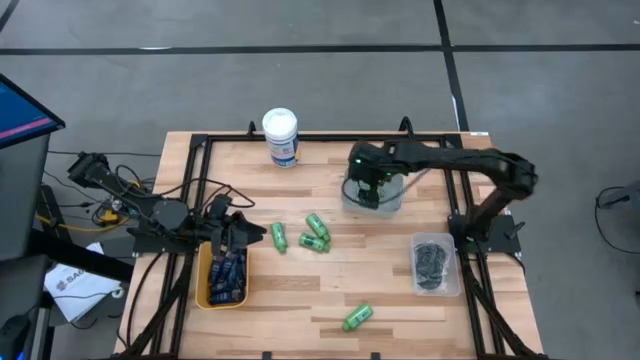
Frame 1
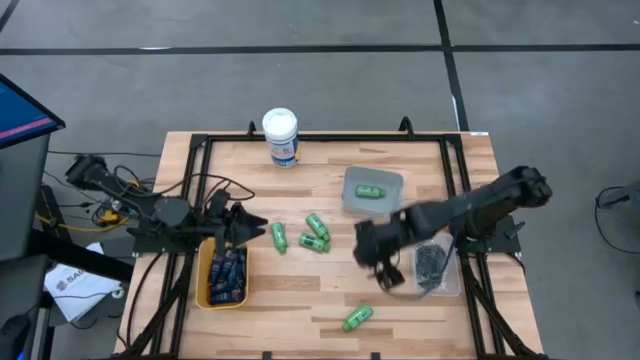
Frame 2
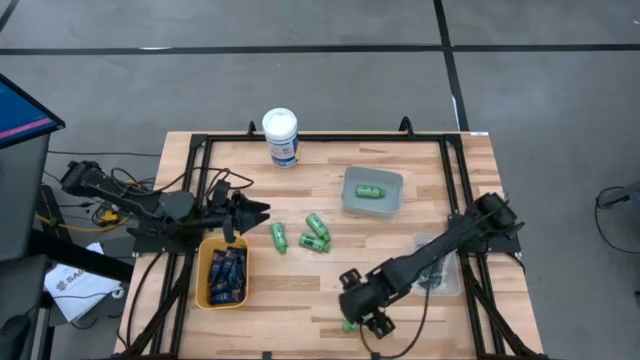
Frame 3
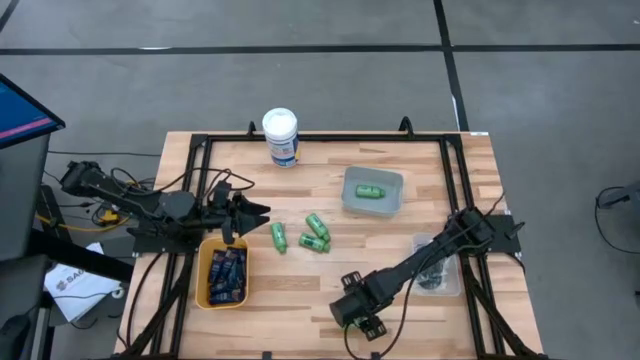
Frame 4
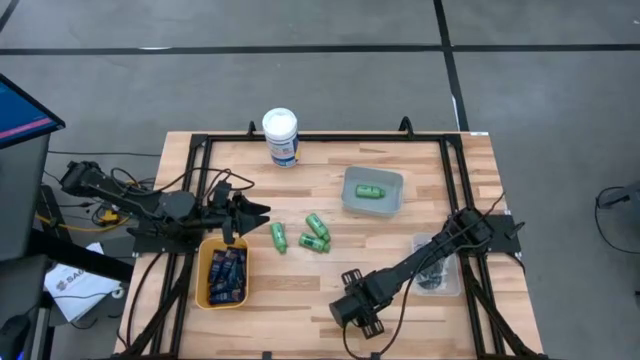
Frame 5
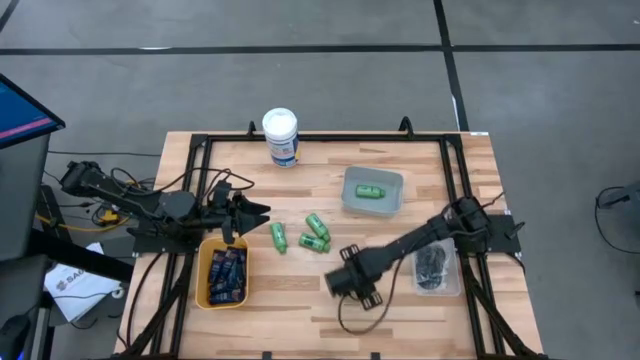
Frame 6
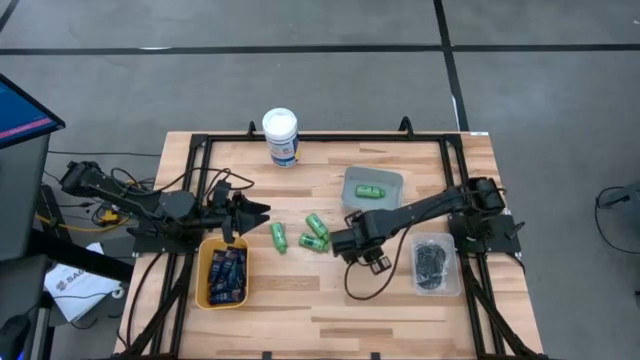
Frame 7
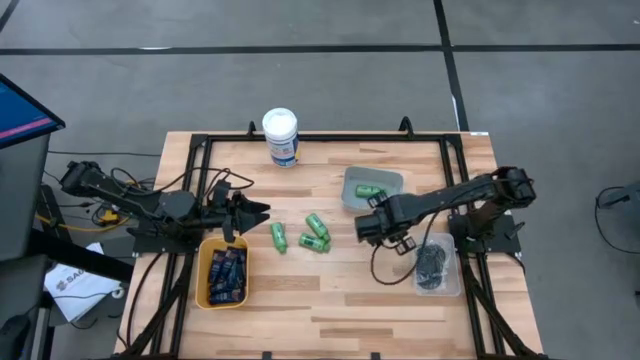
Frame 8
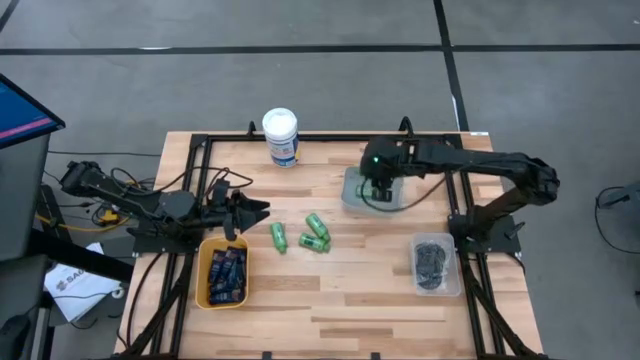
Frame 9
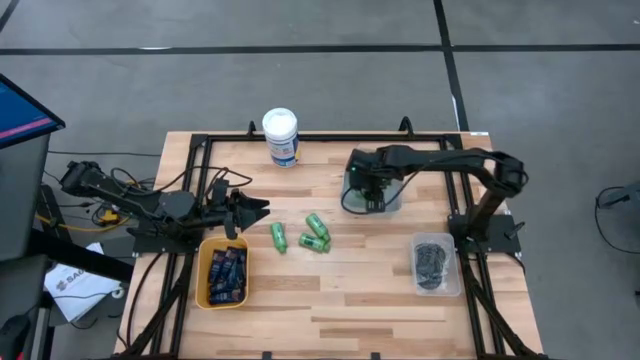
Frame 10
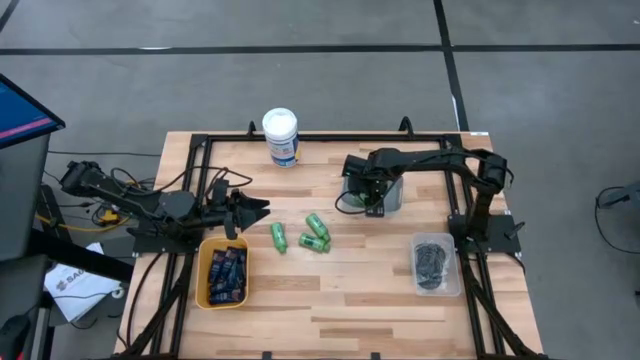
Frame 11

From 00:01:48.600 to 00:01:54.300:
Task: Pick & Place Travel size toiletries
Put the green shampoo into the gray bin

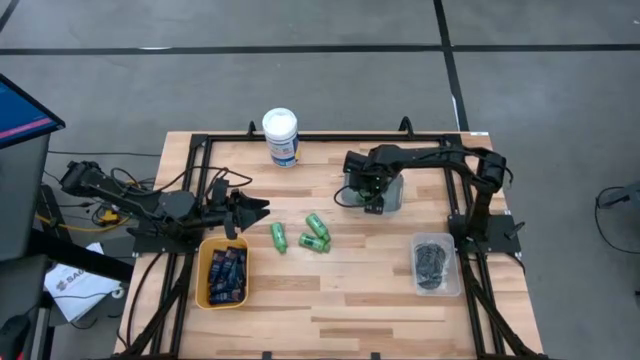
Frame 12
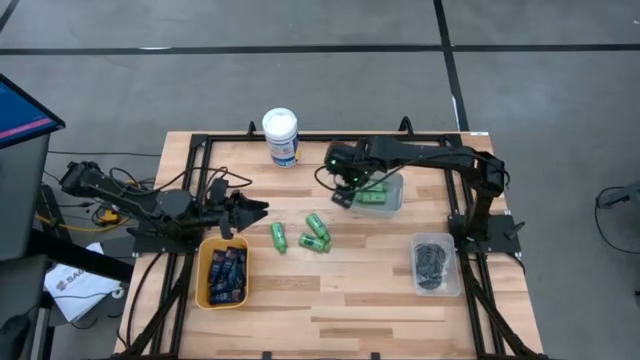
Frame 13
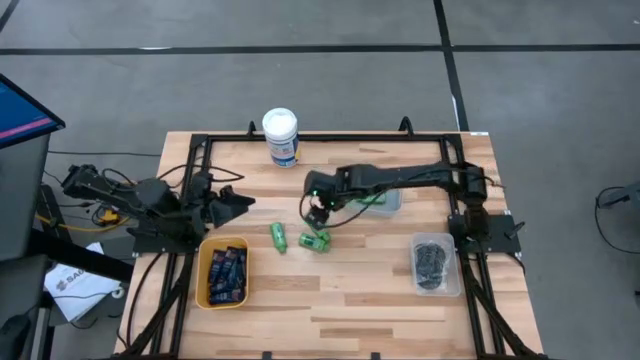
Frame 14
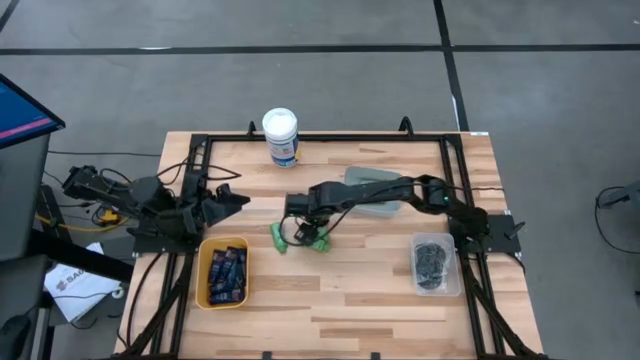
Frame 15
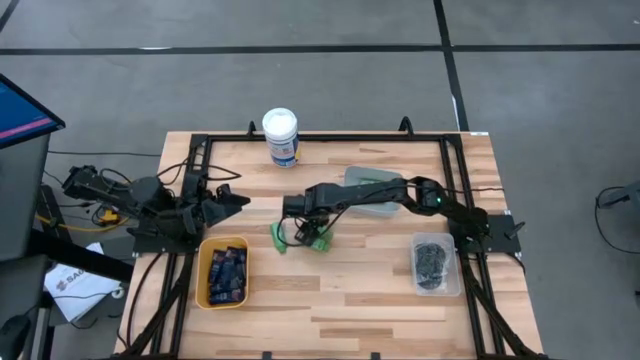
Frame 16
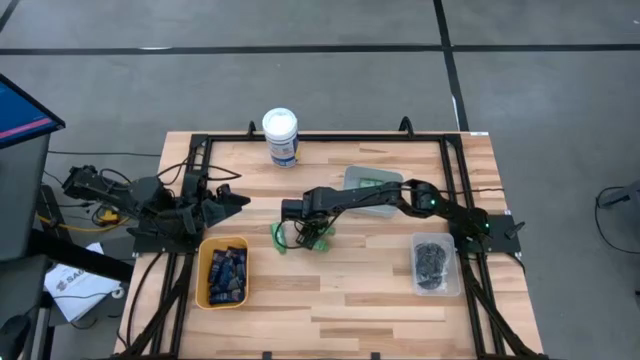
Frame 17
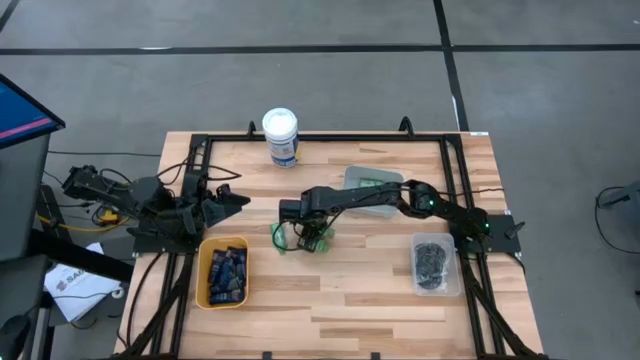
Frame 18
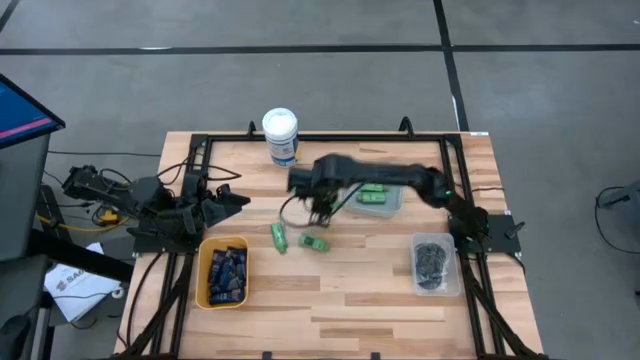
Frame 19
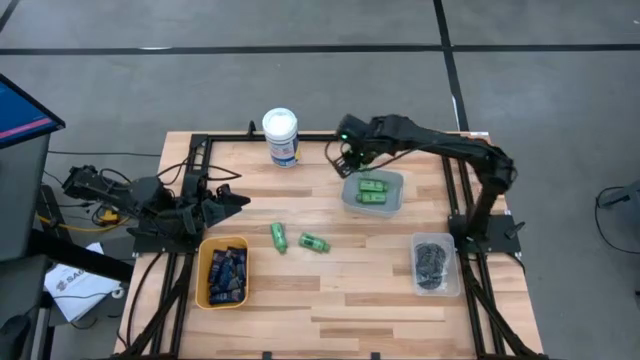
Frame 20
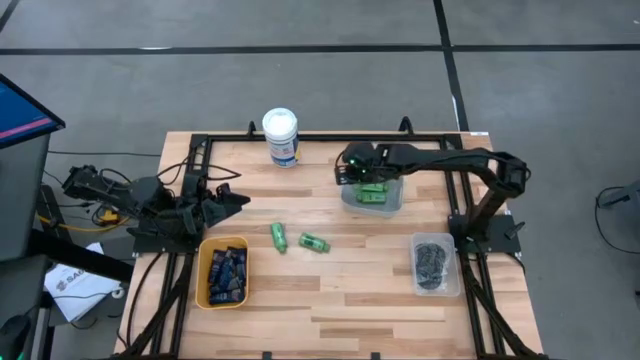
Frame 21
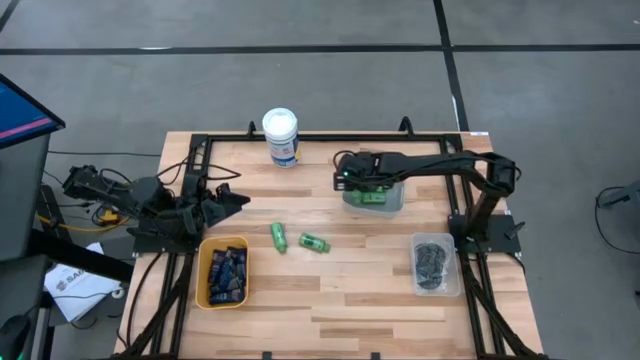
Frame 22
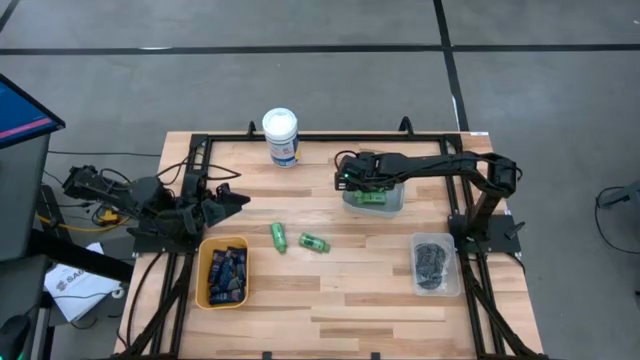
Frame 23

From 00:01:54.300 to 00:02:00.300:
Put the green shampoo into the gray bin

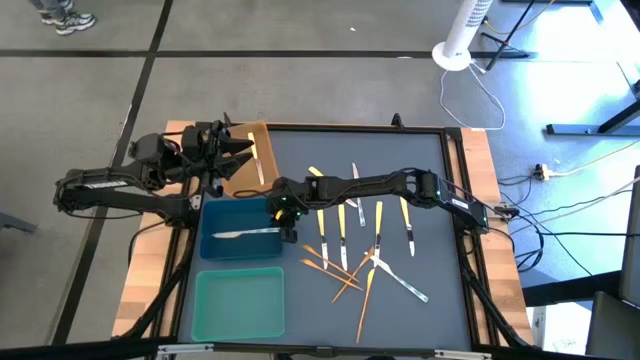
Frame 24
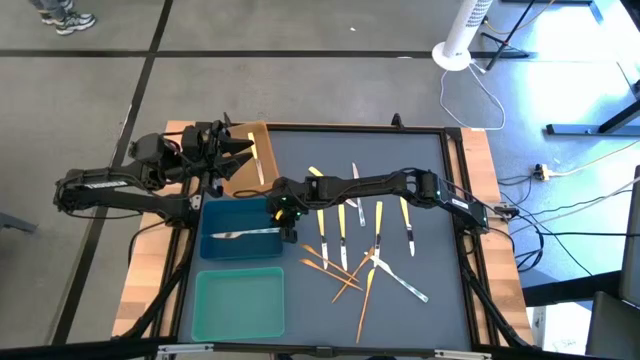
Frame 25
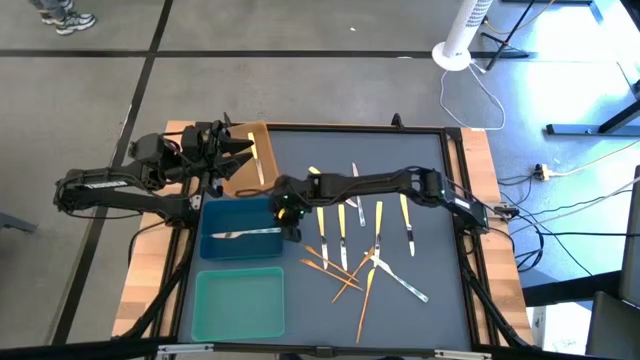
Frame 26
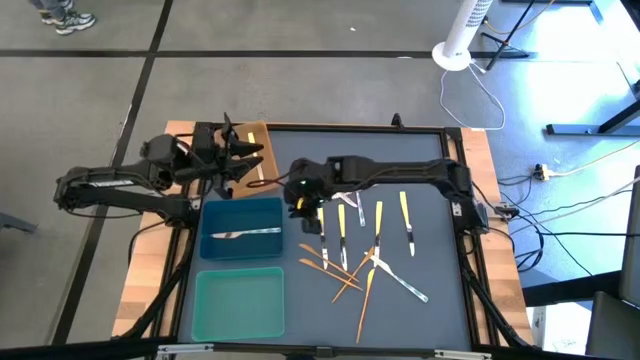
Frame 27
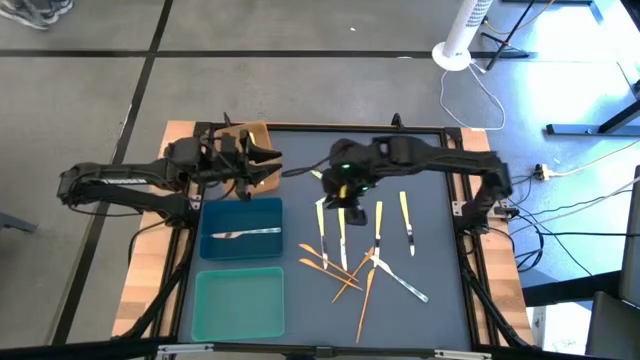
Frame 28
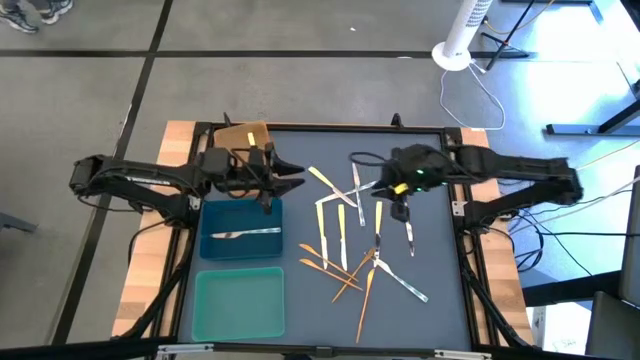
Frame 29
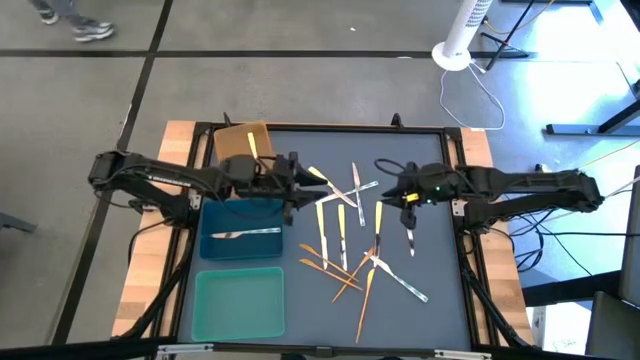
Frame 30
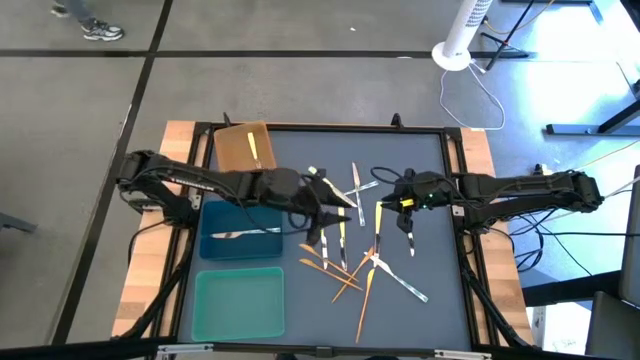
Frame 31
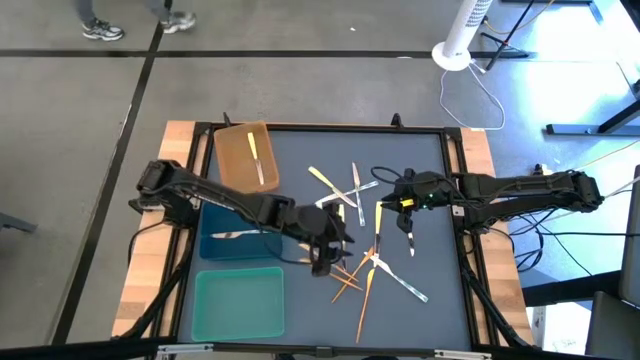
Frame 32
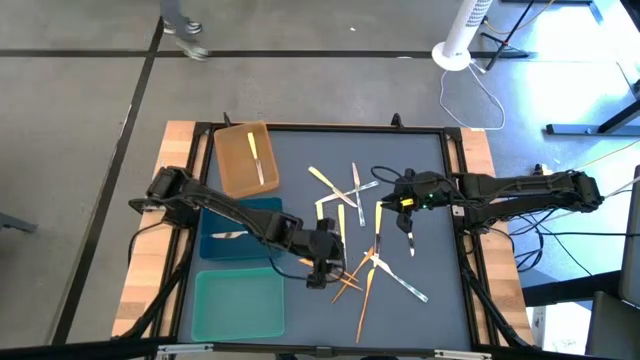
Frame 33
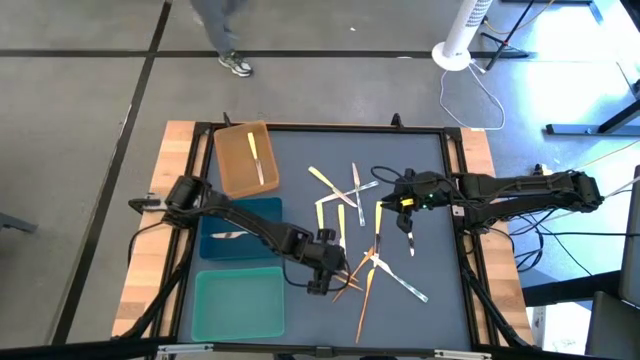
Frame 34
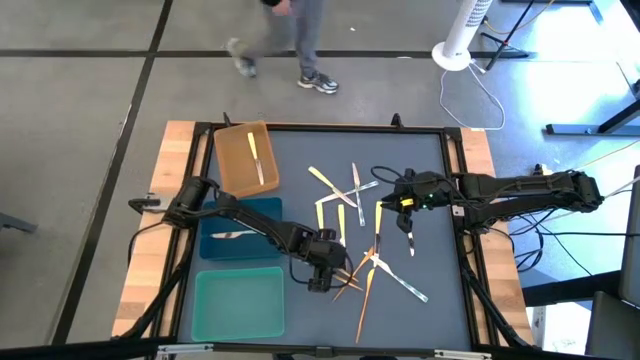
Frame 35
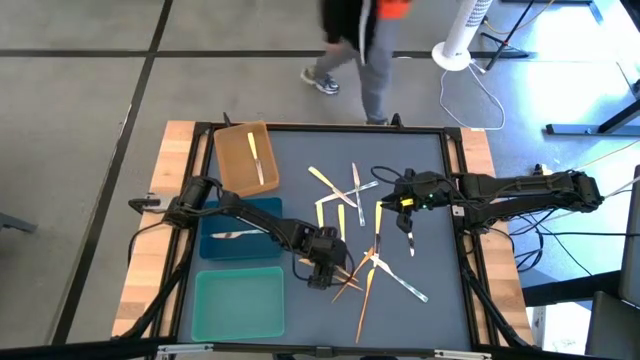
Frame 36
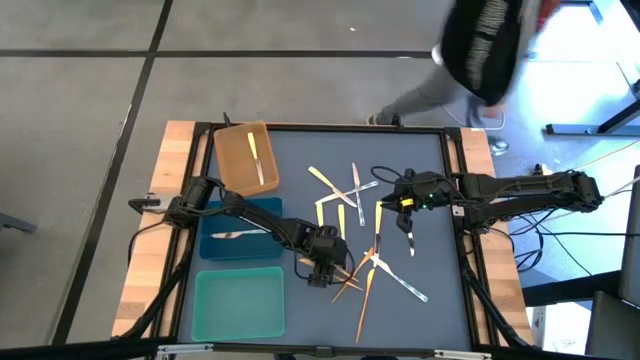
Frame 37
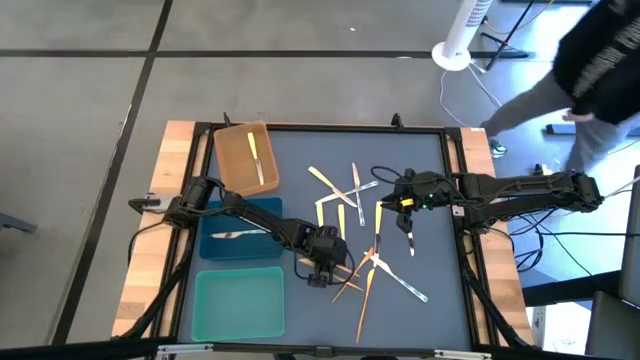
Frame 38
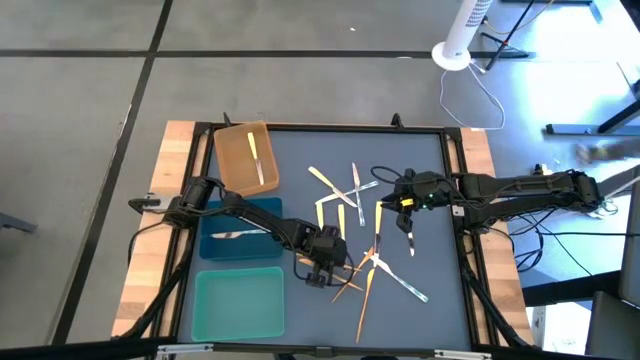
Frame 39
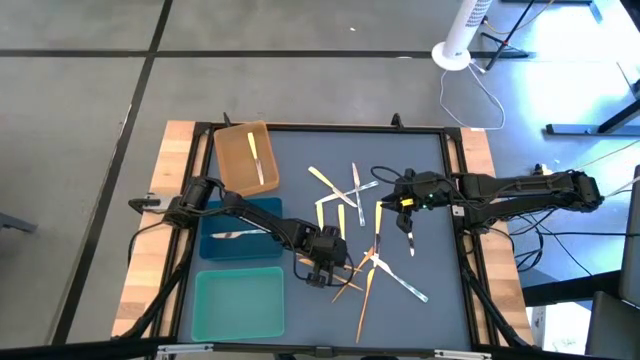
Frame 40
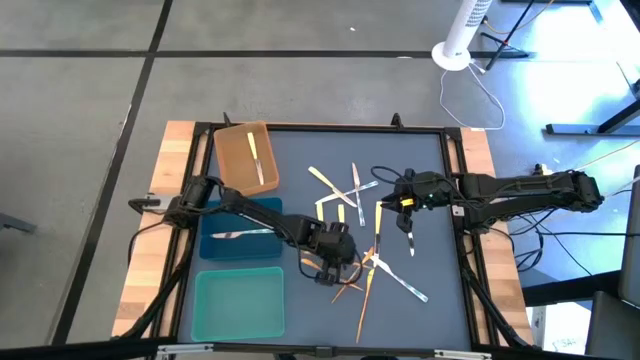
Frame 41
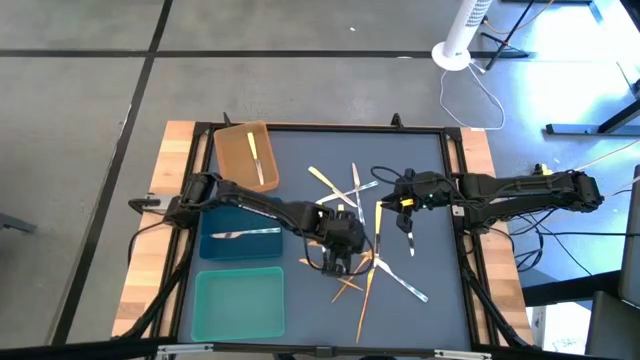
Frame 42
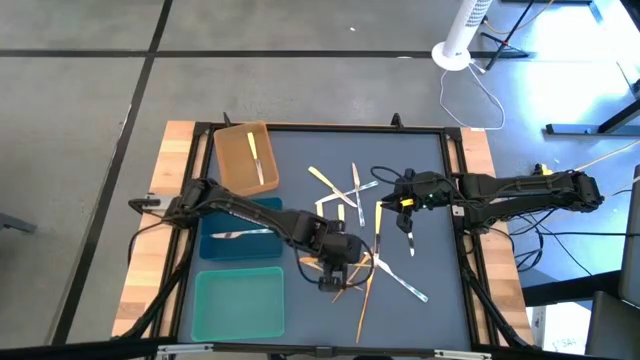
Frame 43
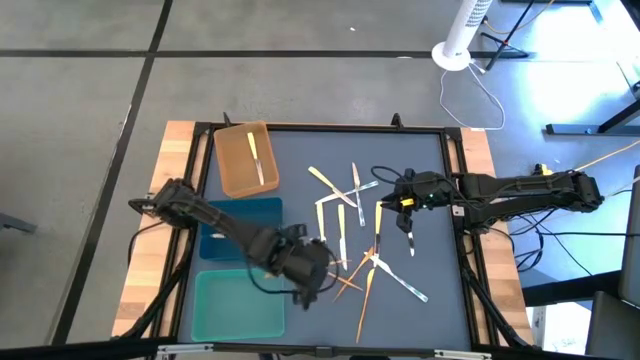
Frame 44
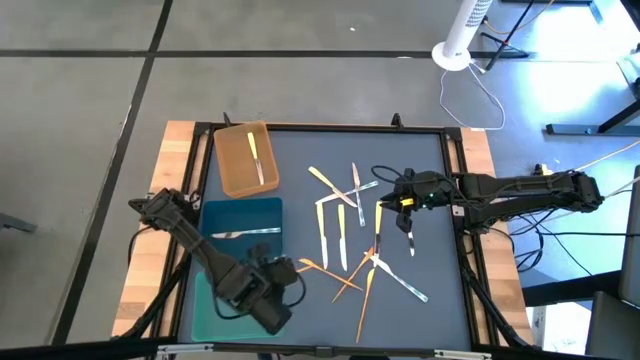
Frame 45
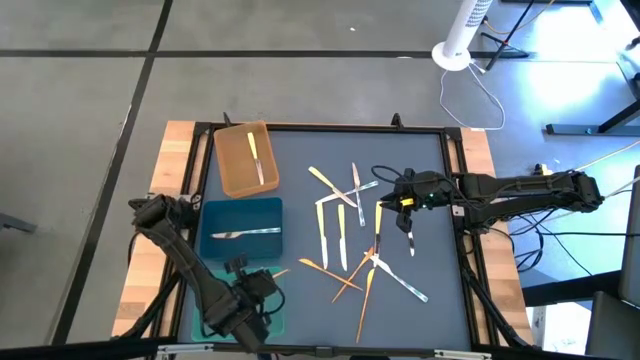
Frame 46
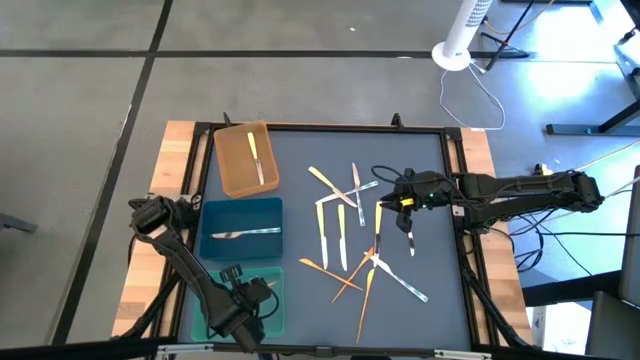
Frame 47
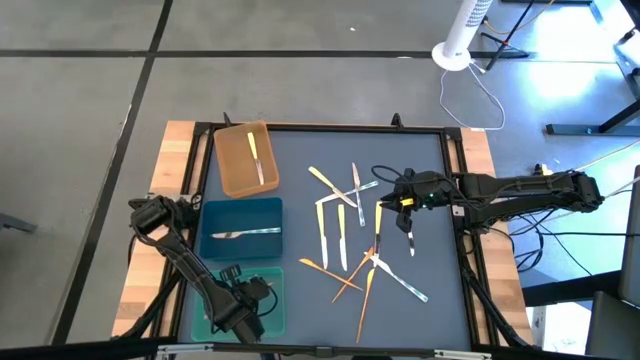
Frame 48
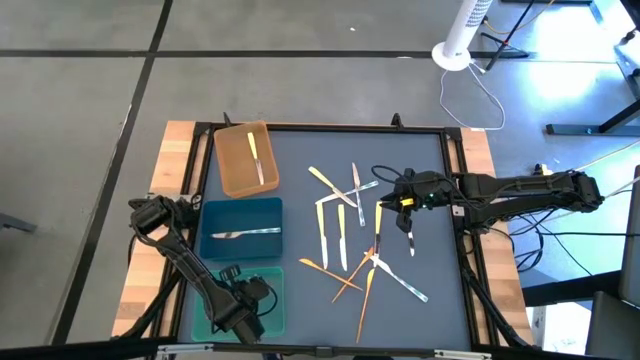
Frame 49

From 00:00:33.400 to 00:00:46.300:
Task: Sort silverware by color (type)
Put the gold knife into the green bin
